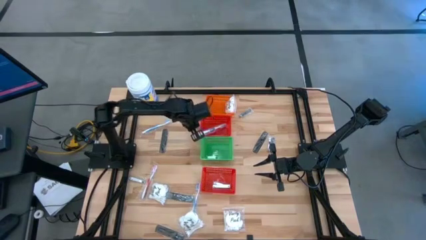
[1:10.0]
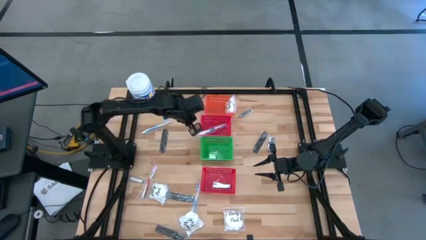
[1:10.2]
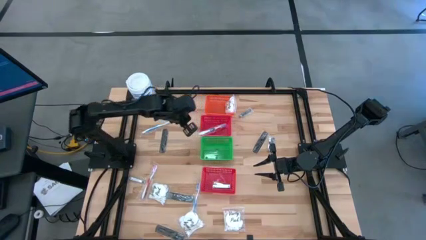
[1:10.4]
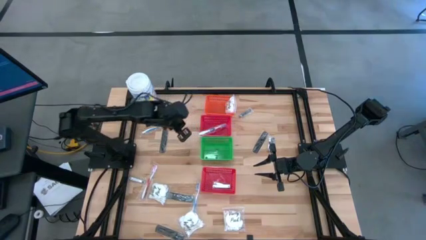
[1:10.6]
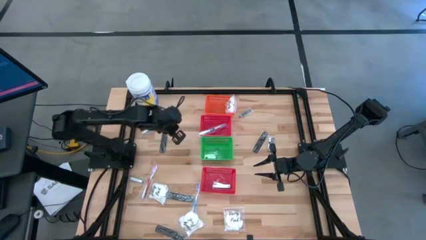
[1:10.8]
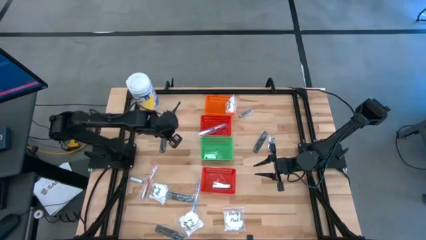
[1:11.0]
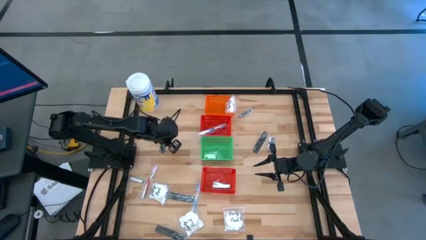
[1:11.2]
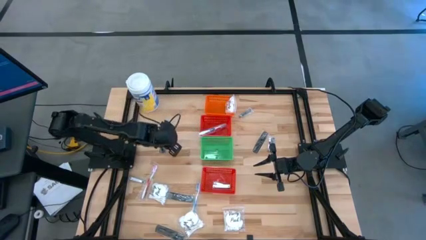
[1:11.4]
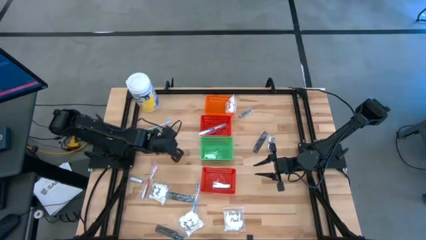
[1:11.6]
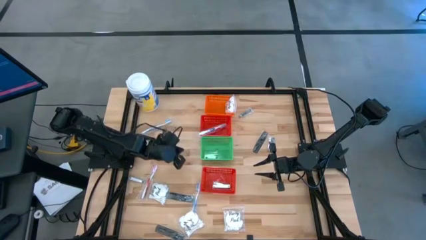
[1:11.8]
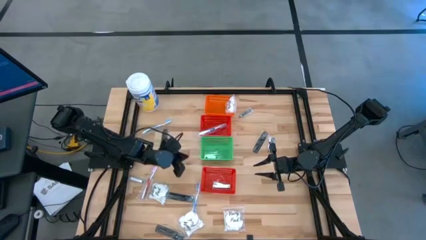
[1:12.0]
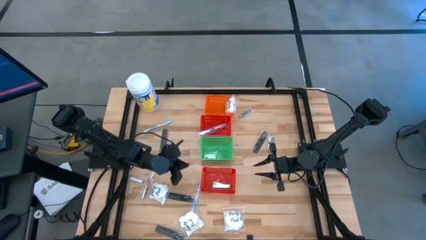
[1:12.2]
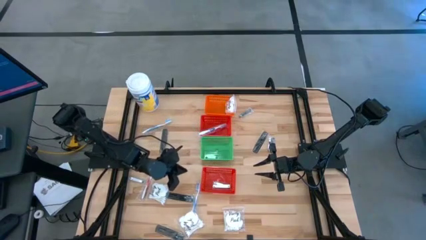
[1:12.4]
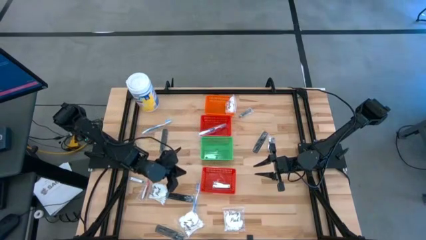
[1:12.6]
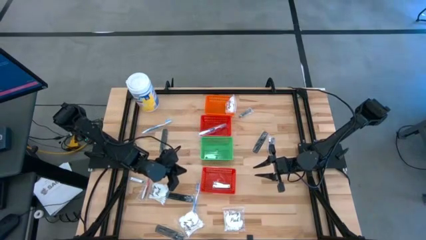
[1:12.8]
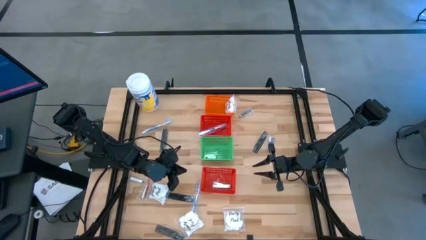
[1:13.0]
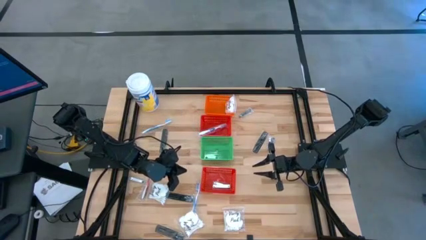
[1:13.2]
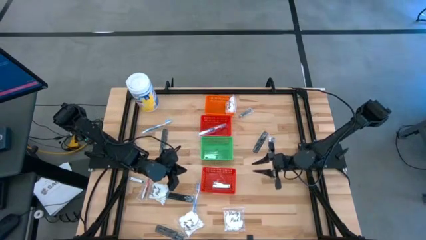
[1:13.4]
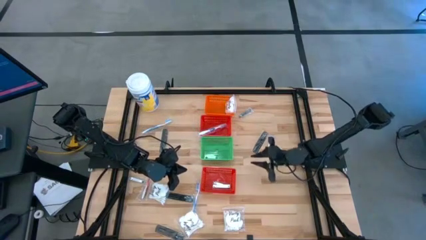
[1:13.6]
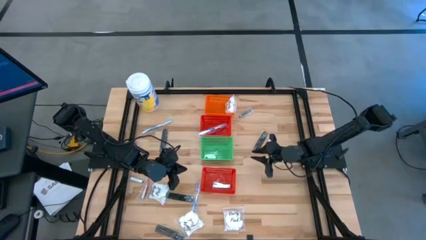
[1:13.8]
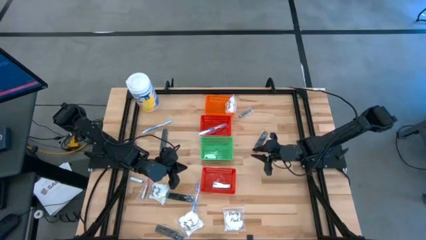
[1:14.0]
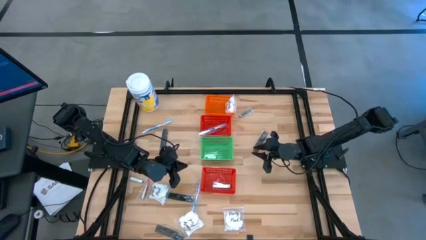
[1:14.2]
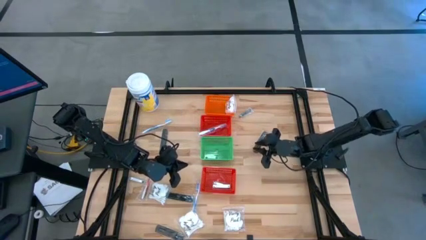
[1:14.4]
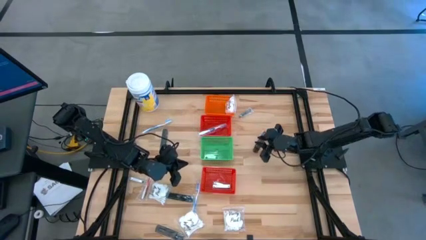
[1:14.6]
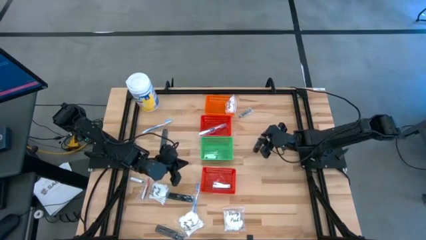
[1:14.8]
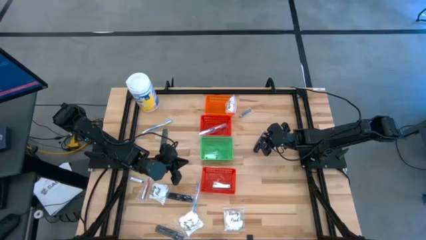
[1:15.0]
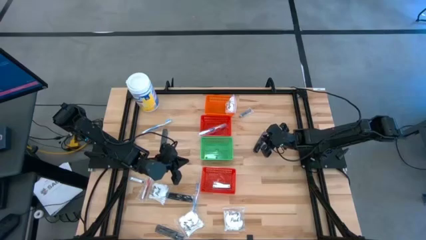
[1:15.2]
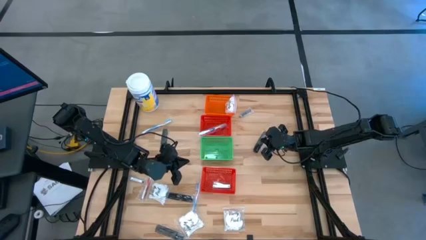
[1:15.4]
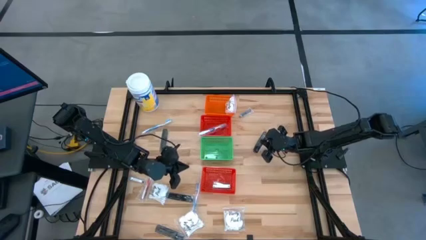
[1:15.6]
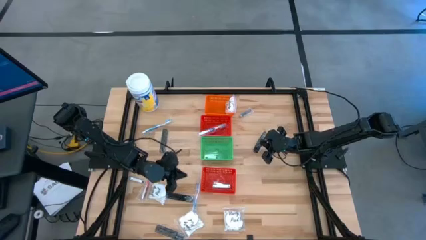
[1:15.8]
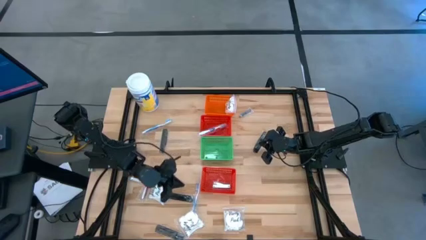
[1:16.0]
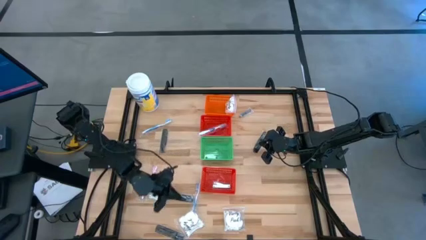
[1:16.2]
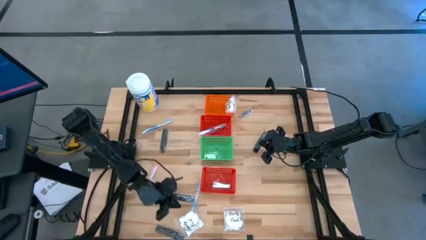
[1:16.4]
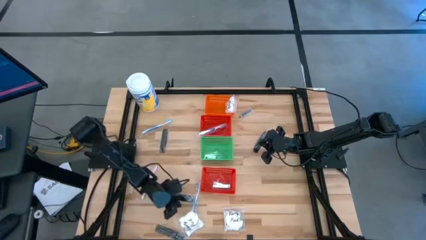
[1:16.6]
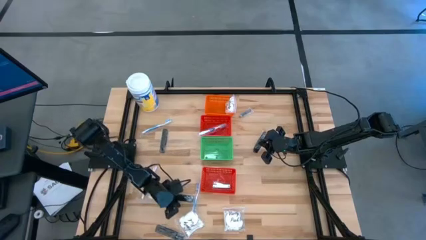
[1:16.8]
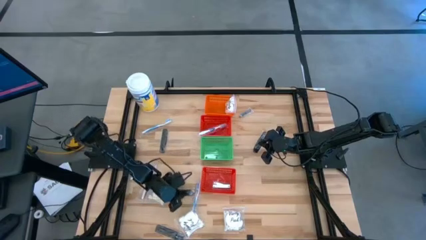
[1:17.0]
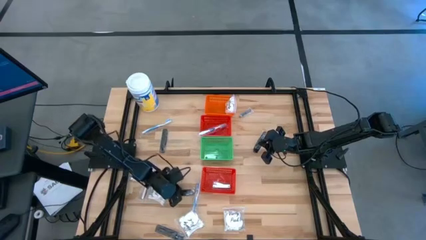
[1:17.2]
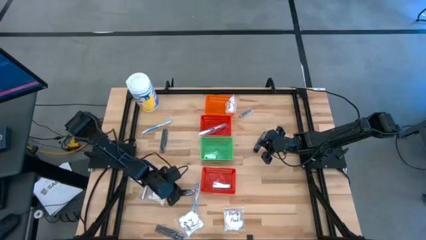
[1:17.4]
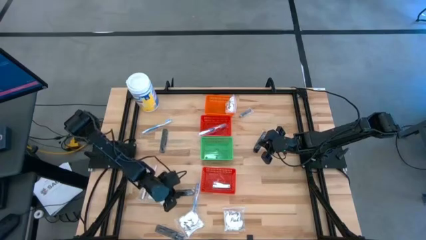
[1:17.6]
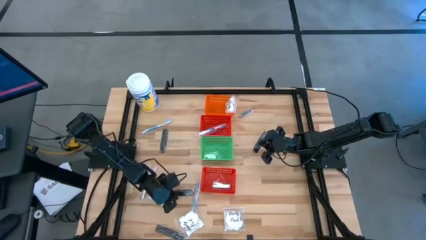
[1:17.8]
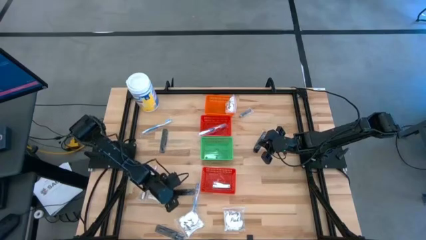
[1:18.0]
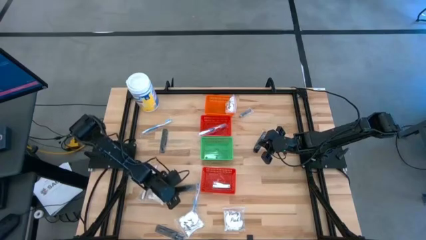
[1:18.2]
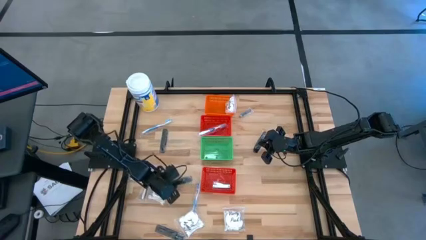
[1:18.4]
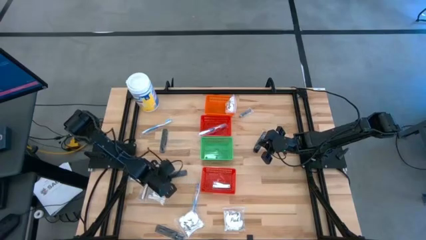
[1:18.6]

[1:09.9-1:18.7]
Task: Pick & Place Travel size toiletries
Adjust the black comb

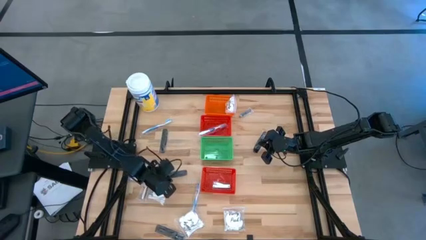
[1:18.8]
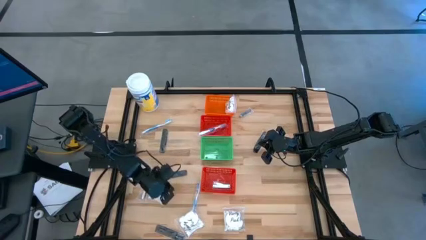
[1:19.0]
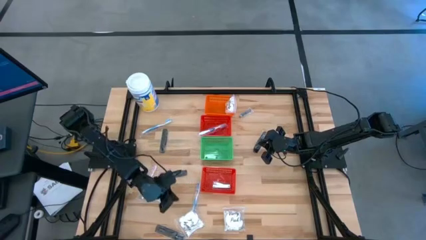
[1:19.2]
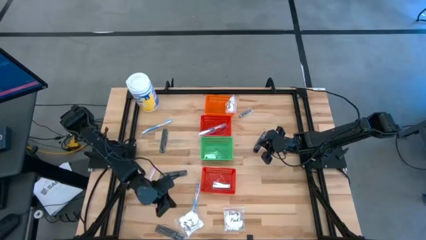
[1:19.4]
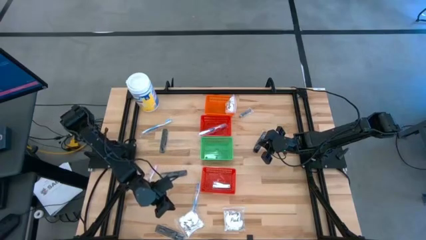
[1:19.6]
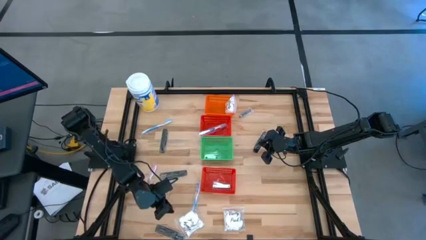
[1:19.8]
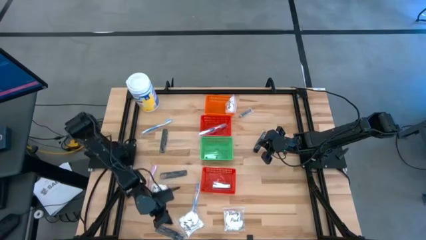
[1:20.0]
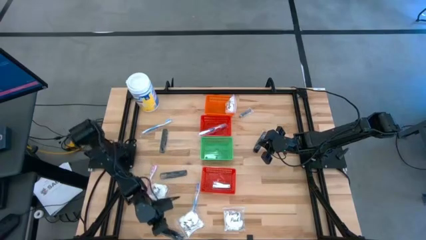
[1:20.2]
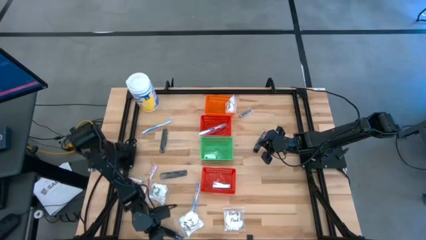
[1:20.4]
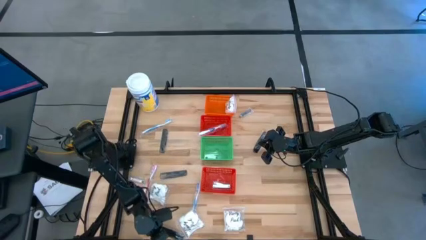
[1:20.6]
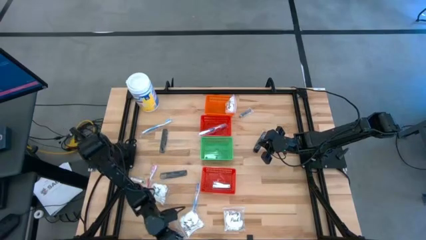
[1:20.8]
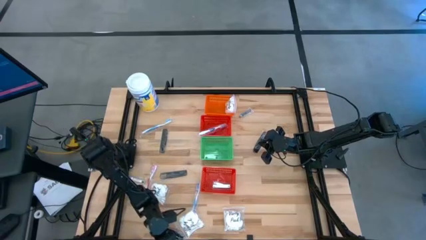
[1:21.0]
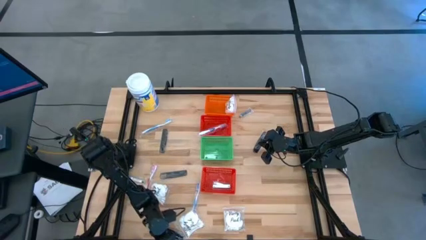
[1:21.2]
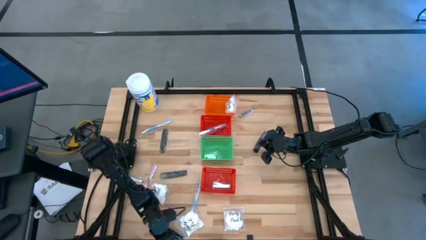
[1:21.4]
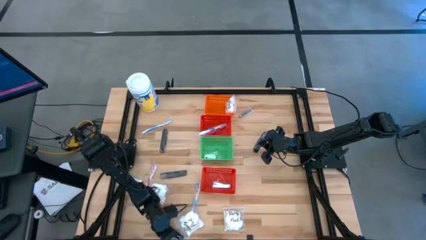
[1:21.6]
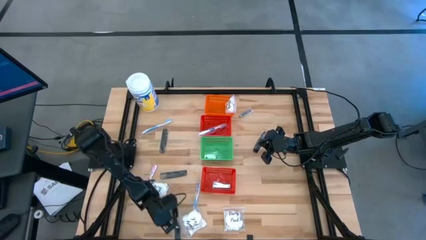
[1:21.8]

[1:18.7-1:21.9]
Adjust the black comb

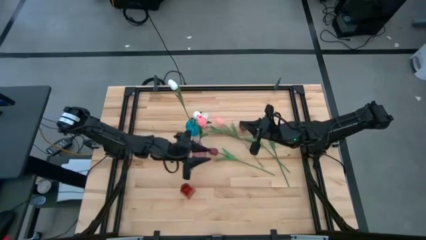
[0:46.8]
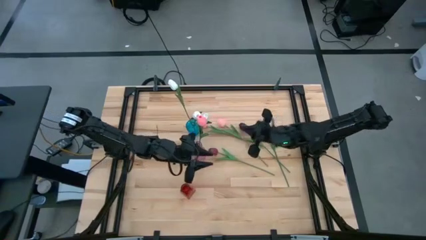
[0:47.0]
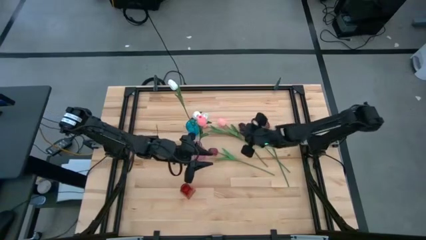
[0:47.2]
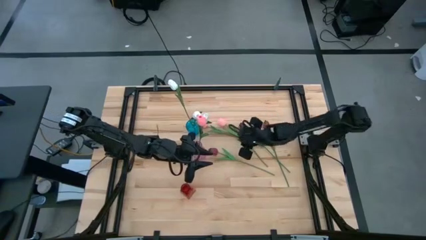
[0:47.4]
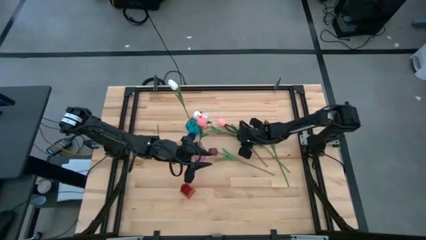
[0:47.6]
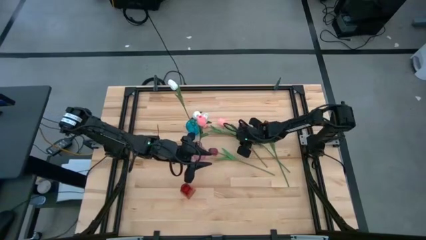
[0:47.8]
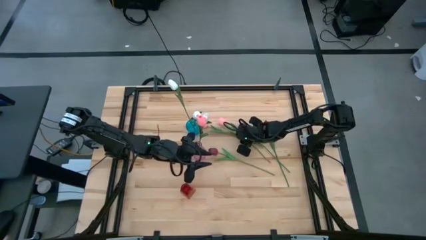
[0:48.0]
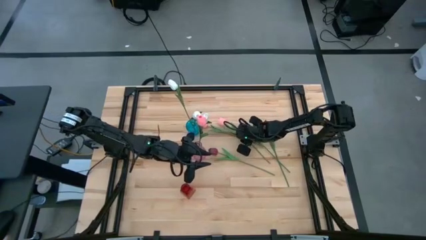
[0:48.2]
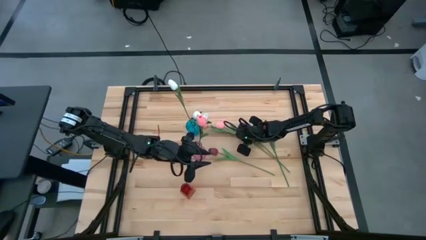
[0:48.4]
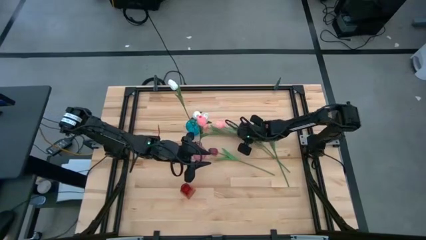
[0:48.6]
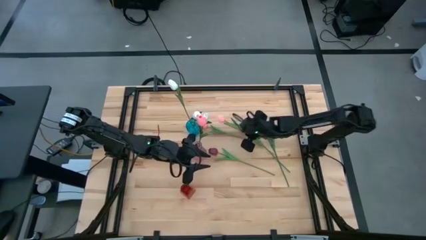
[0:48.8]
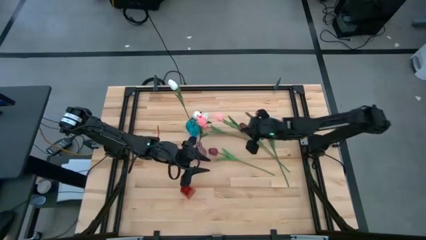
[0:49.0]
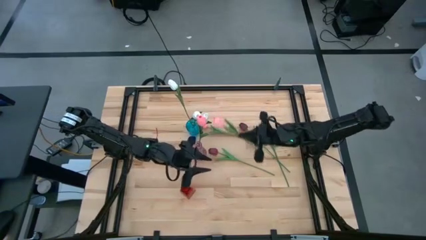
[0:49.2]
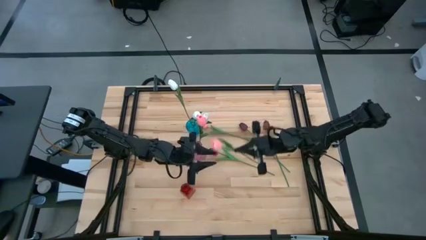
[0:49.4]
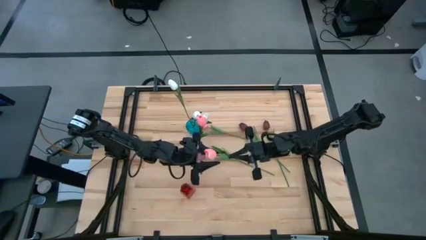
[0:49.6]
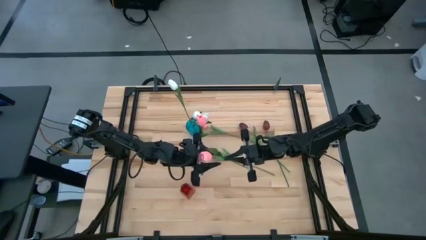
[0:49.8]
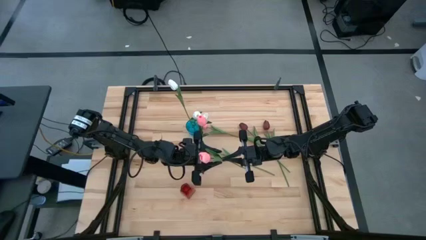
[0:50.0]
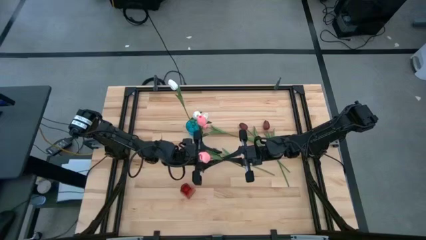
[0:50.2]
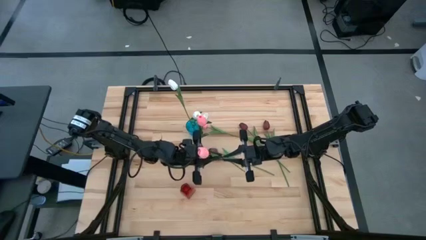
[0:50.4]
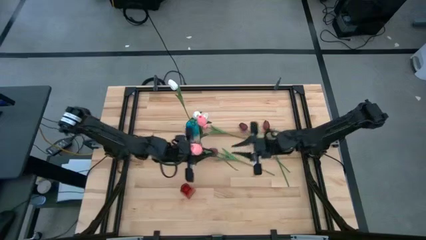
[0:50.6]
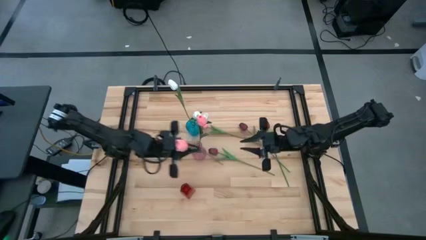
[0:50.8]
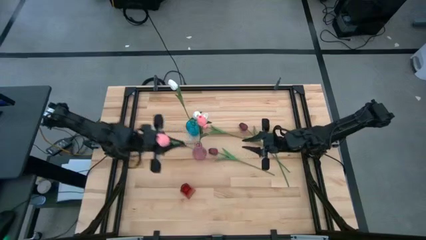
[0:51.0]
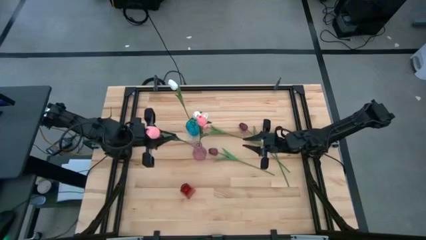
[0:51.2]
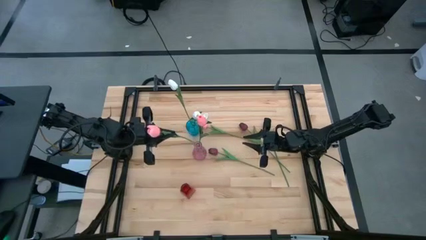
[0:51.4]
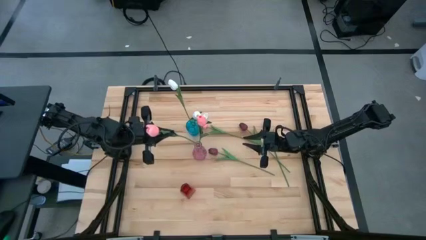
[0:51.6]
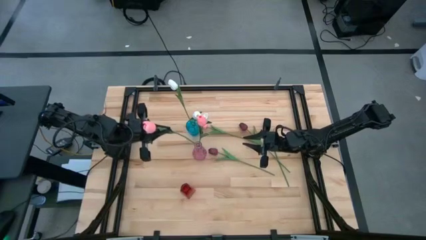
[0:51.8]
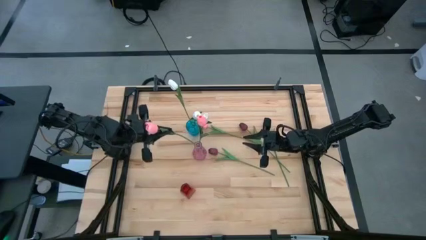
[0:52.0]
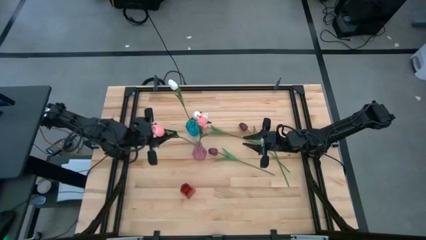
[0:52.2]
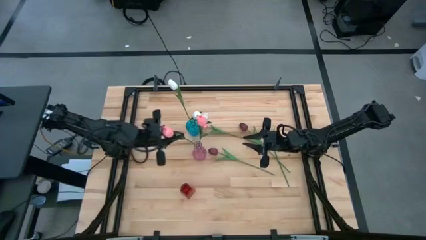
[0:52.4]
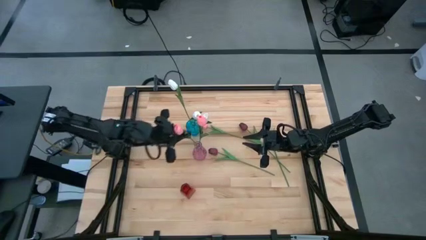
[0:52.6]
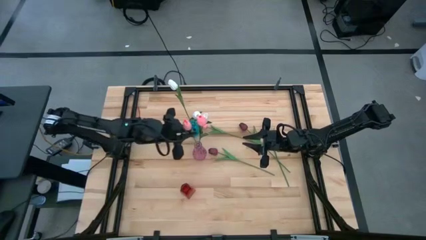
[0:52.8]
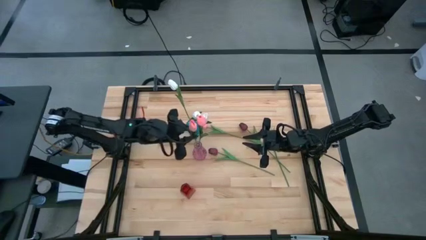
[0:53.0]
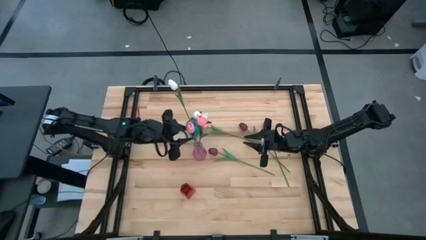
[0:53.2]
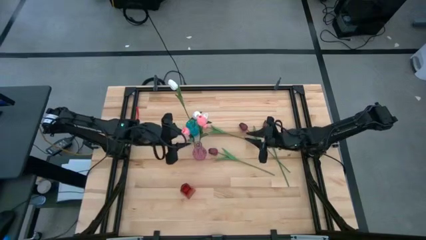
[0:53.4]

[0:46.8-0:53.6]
Task: Sort flowers into vase by color
Put the right pink tulip into the purple vase
